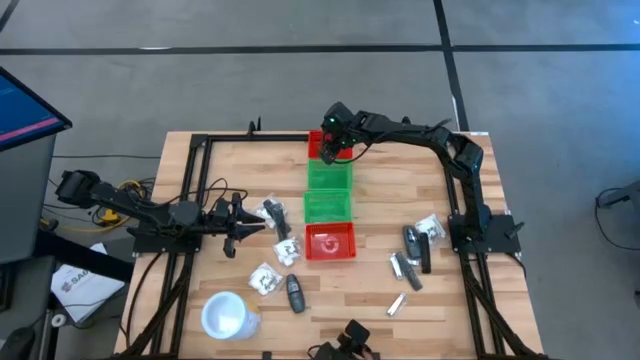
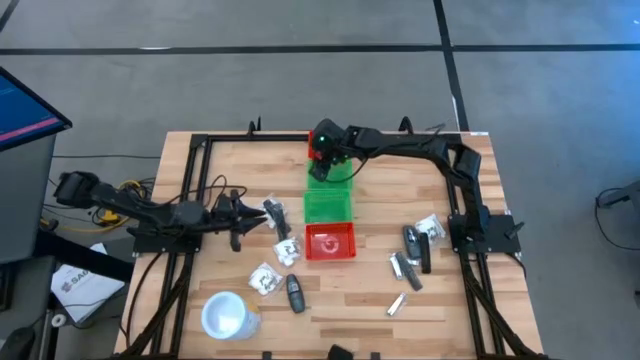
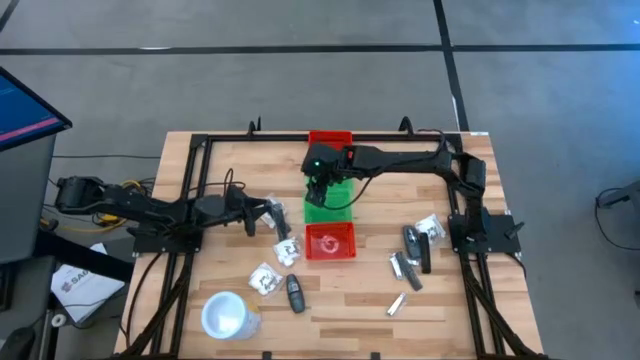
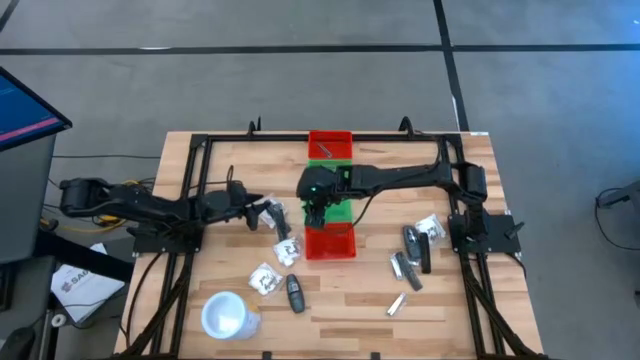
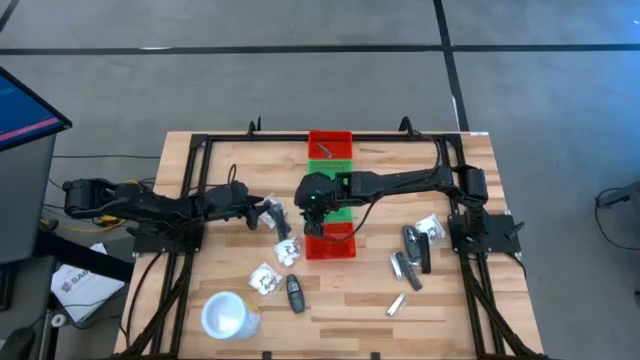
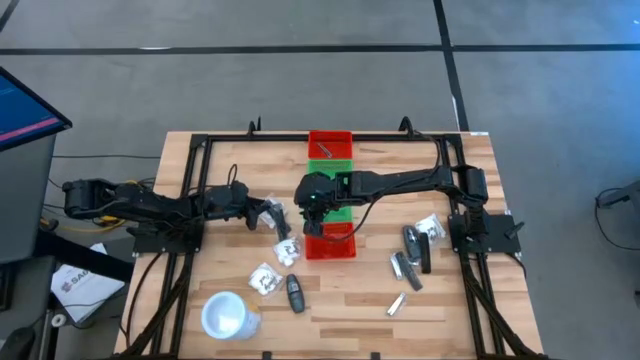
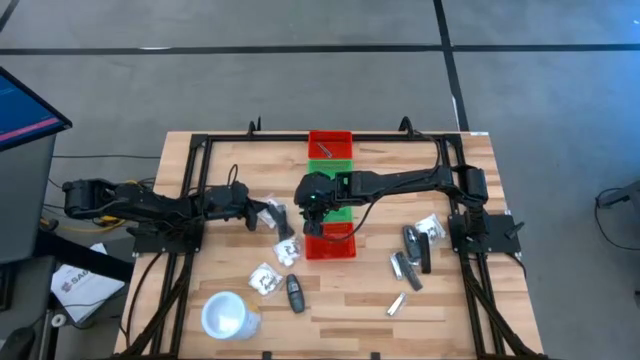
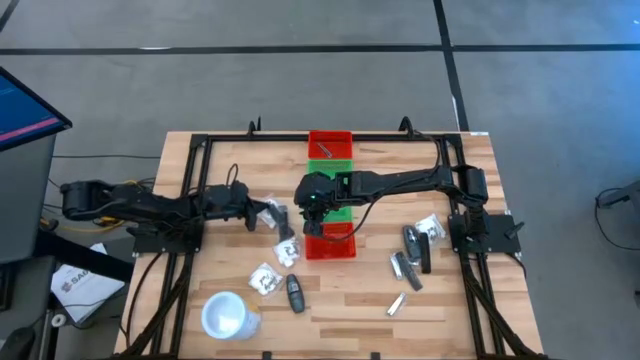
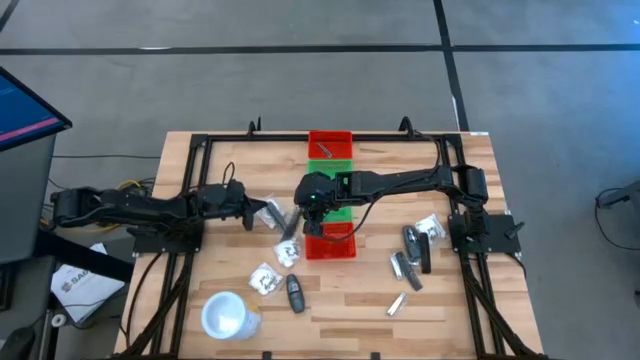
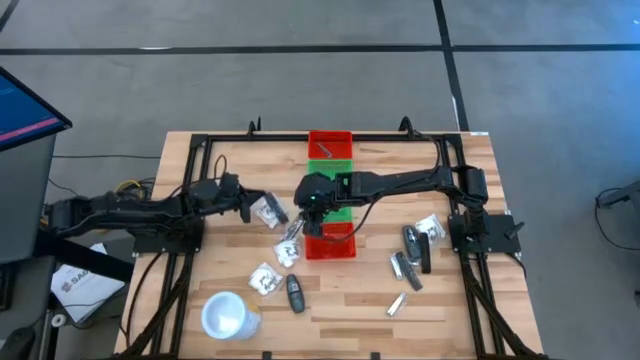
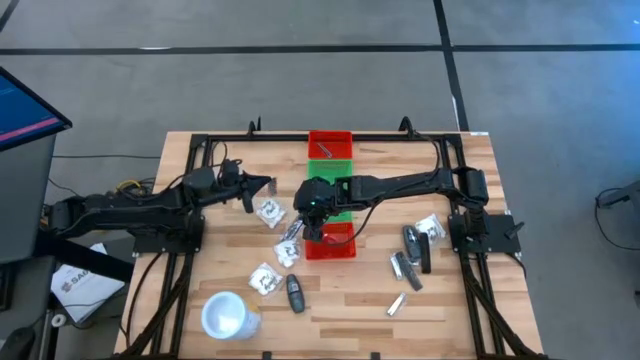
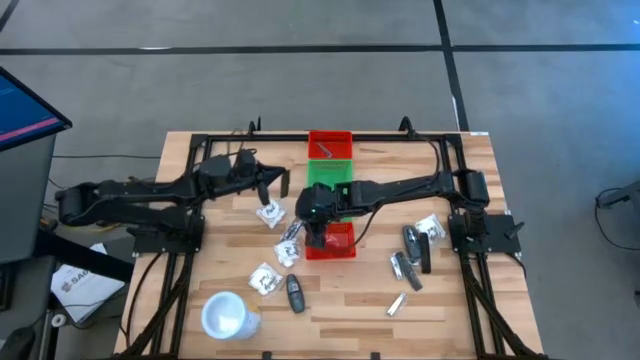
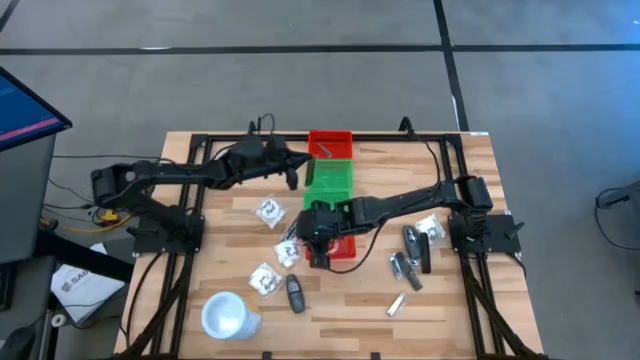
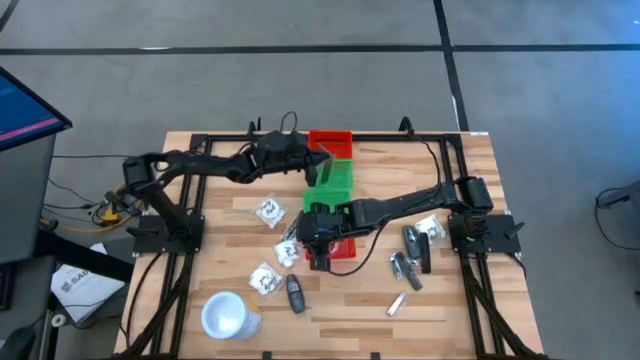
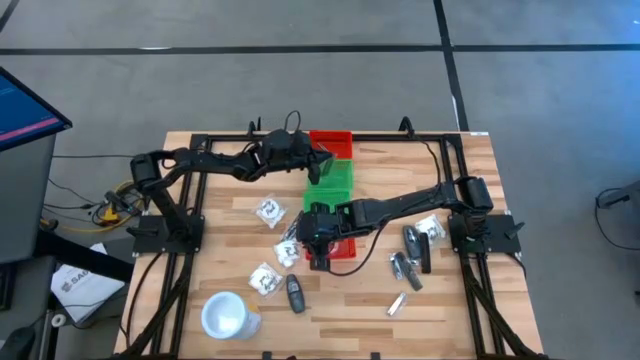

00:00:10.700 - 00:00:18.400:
Task: Pick & Place Travel size toiletries
Put the black comb into the top green bin

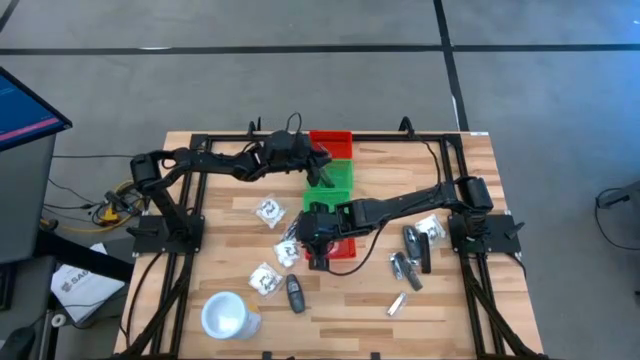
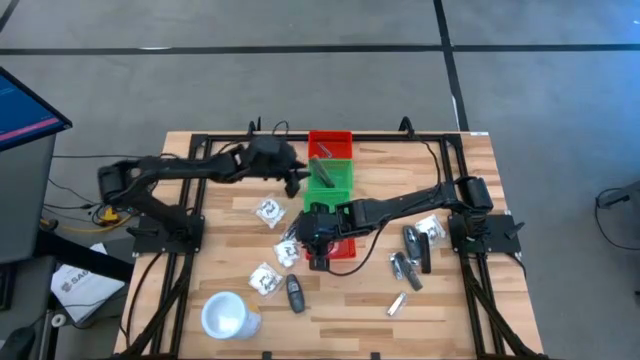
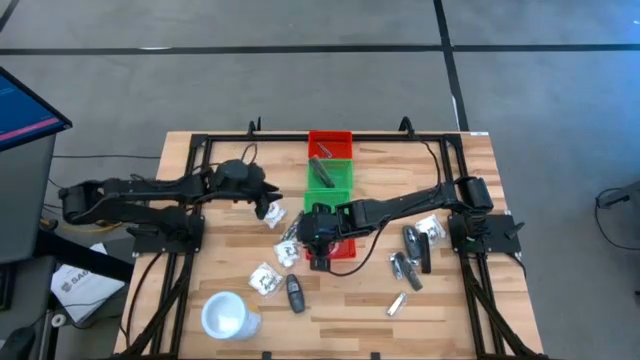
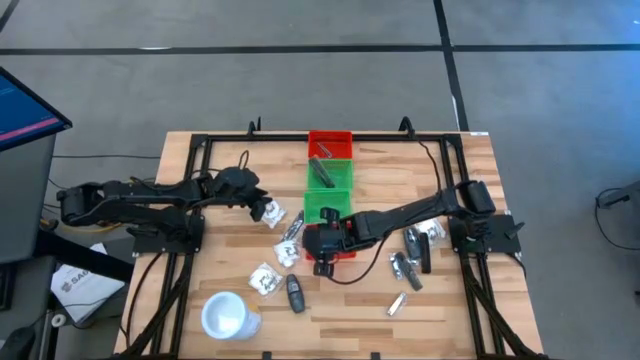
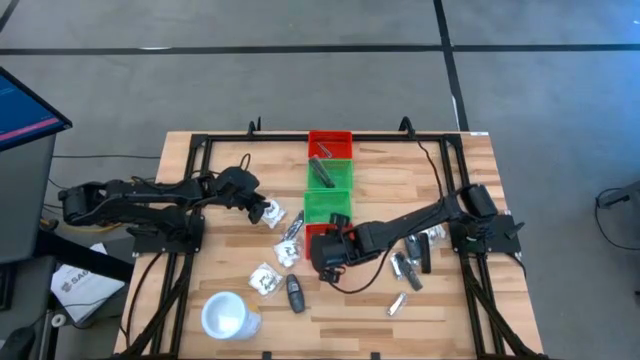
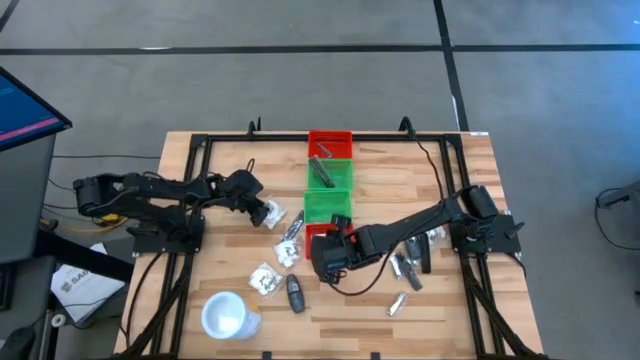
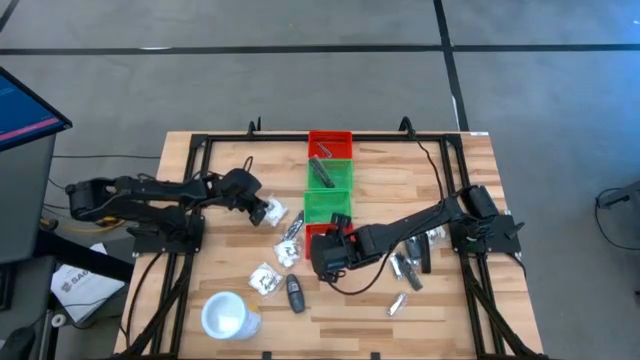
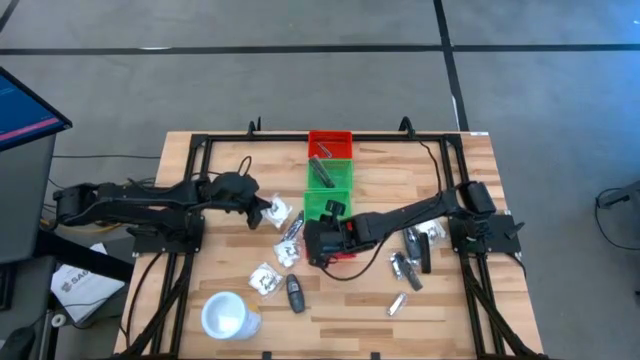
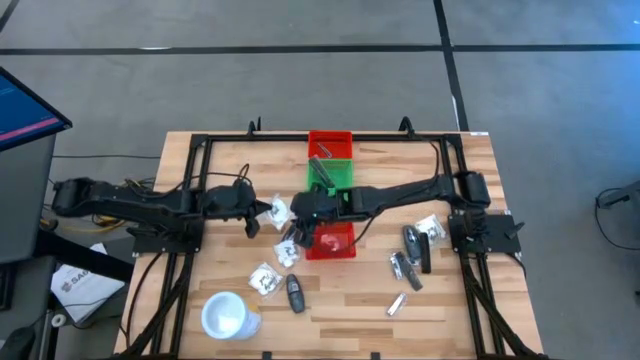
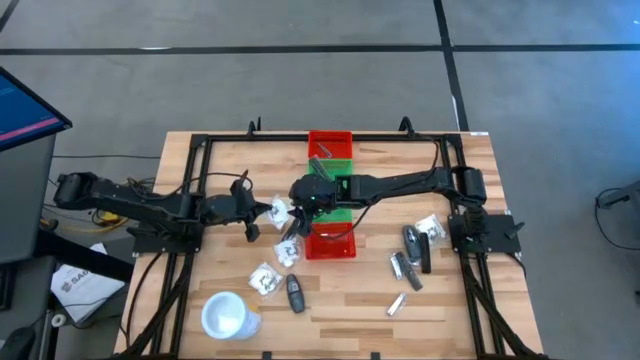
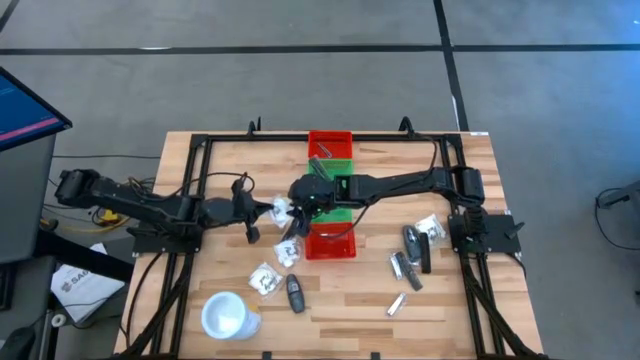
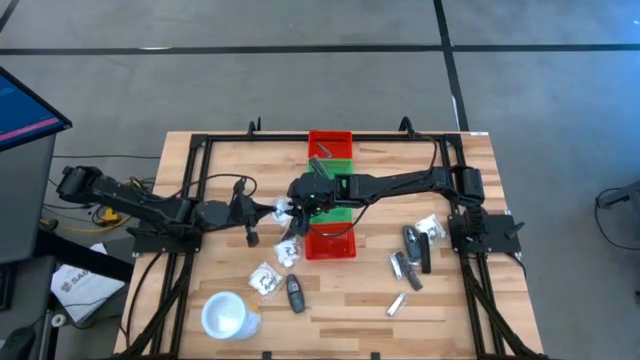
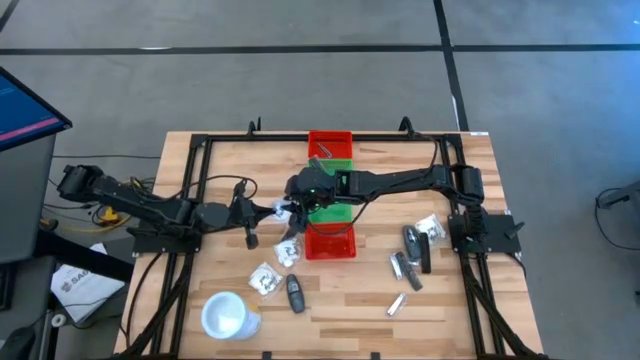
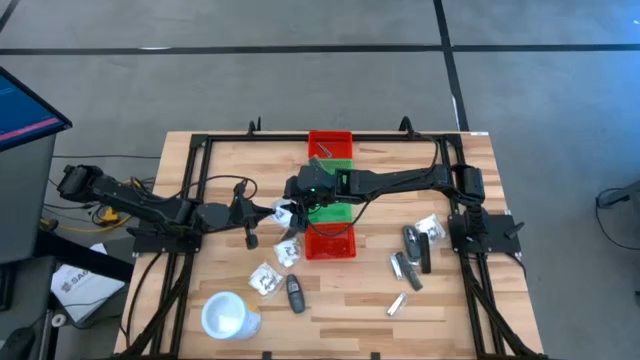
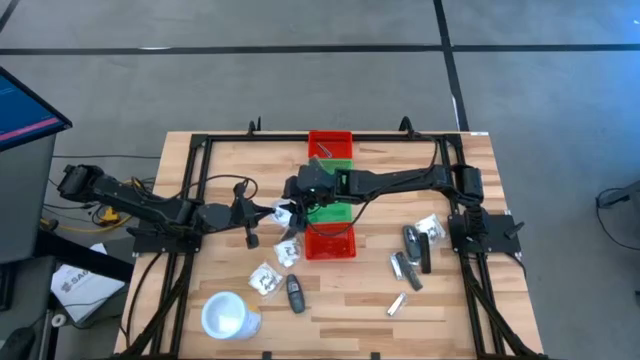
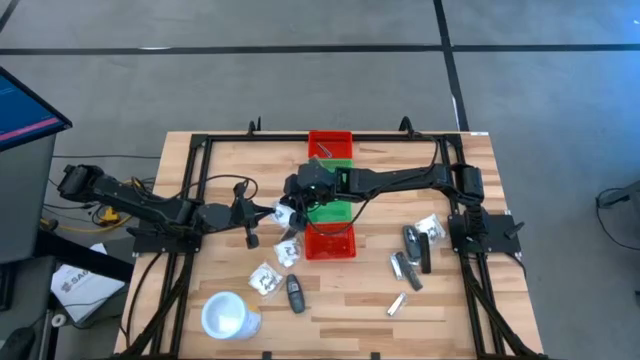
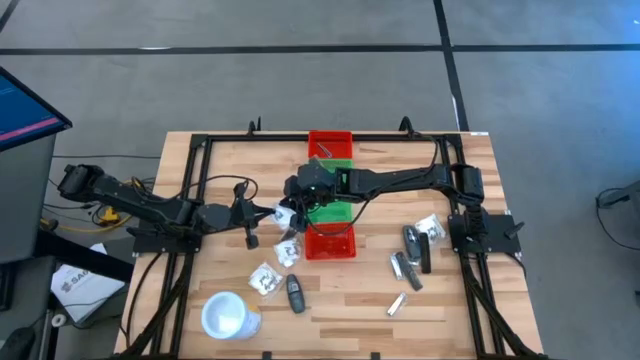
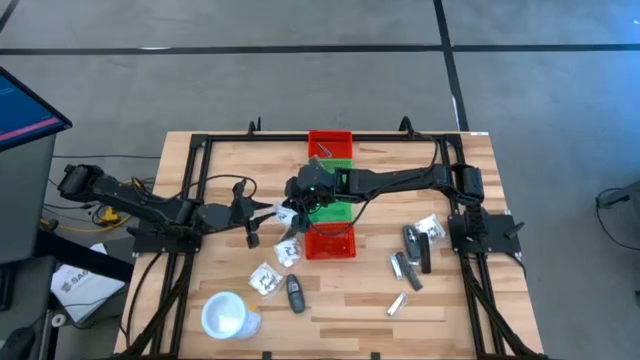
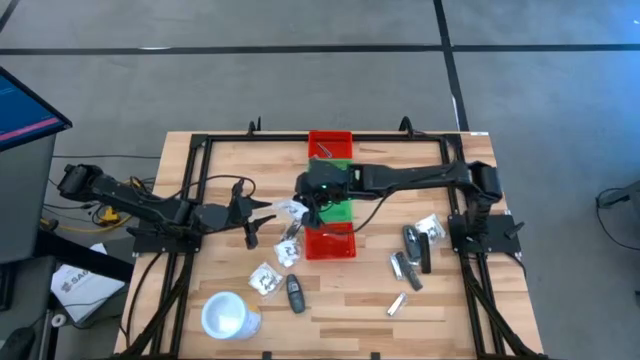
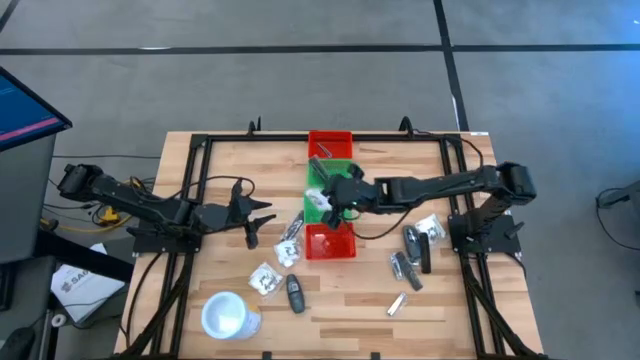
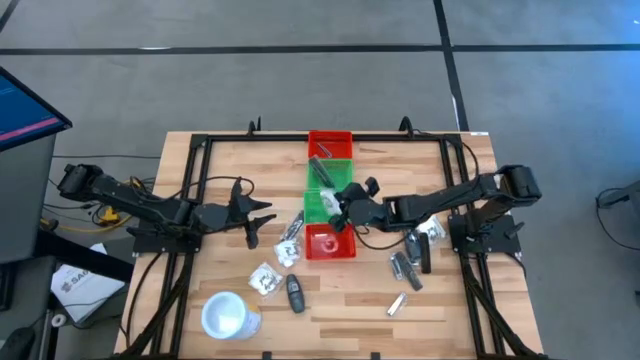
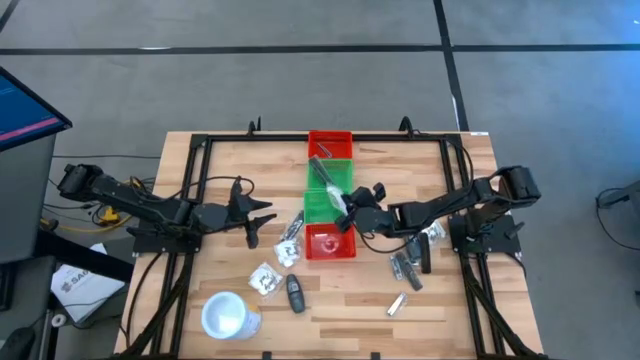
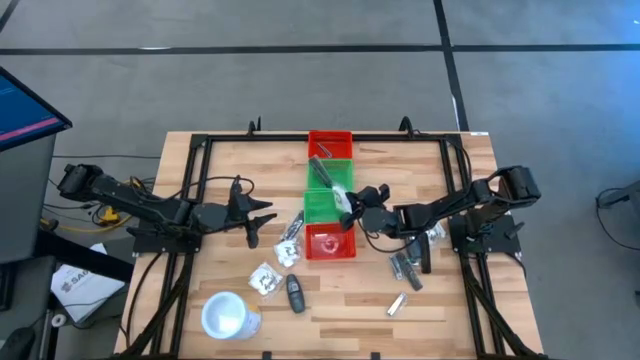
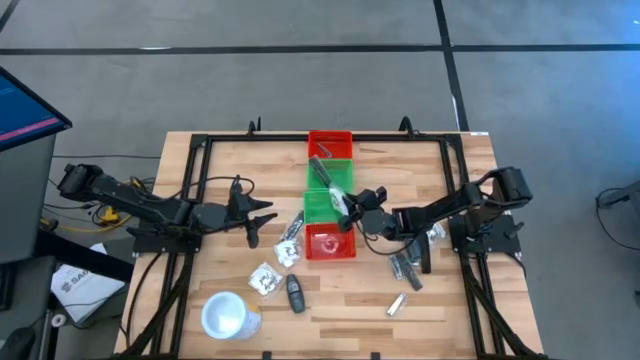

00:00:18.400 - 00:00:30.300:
Put the white cotton pack into the bottom green bin

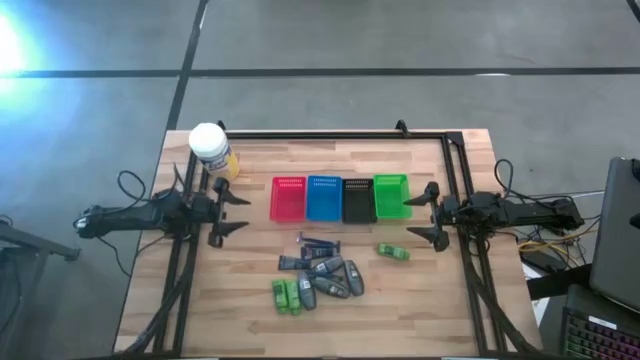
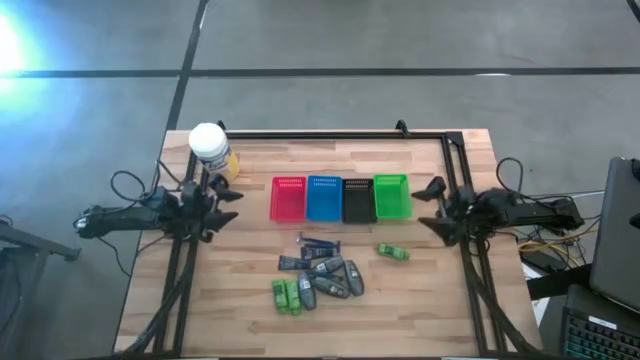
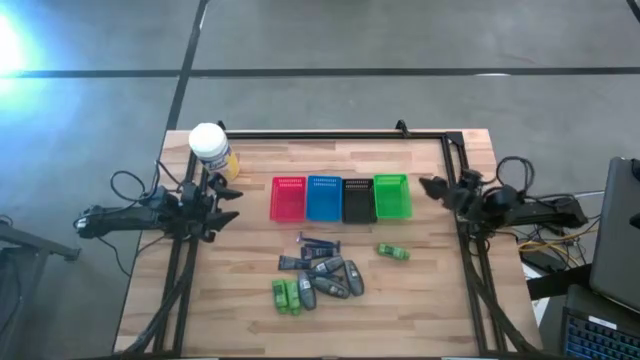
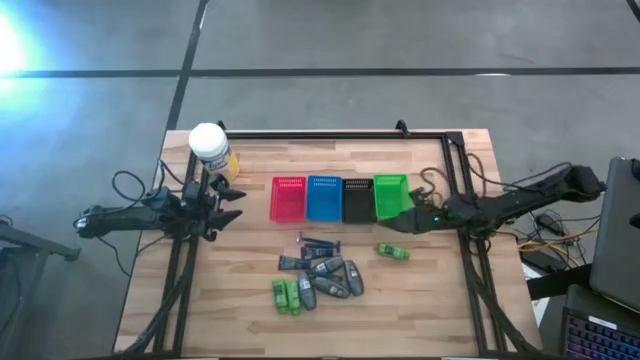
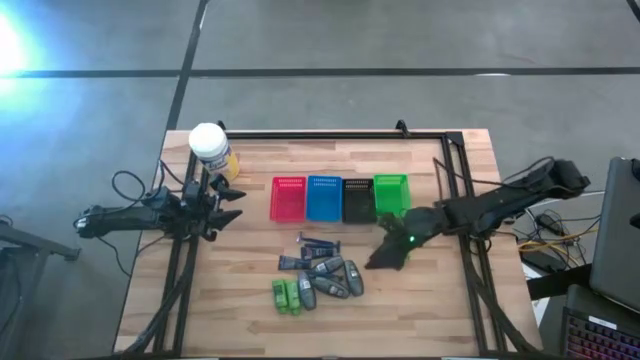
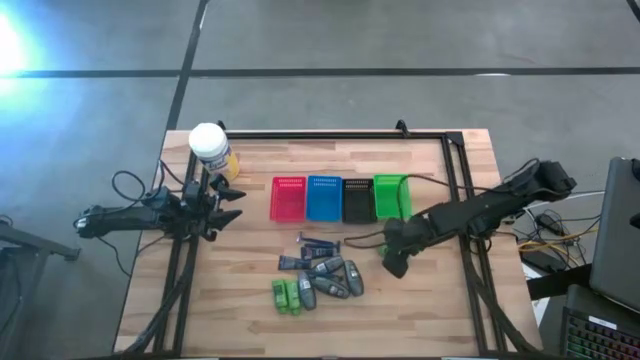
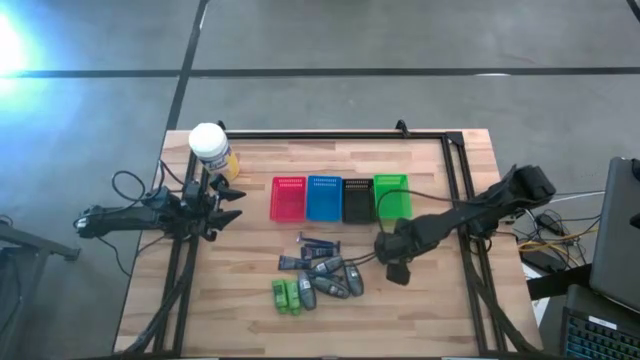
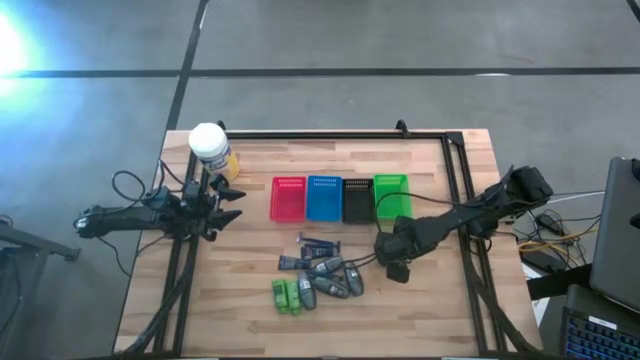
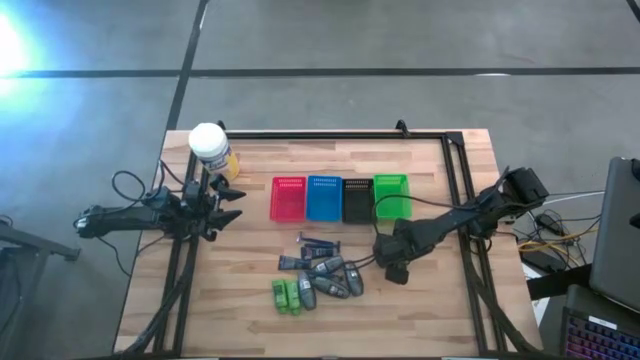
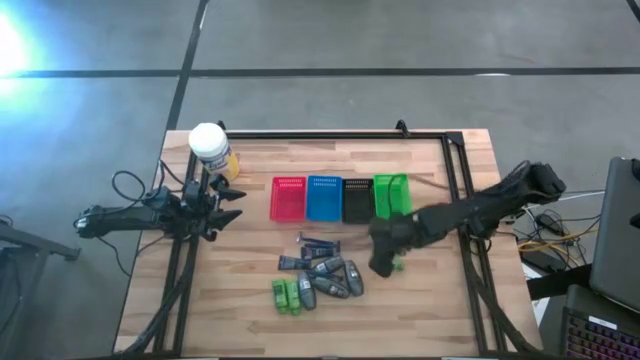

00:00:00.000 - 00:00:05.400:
Task: Pick & Place Travel size toiletries
Put the shampoo into the black basket
